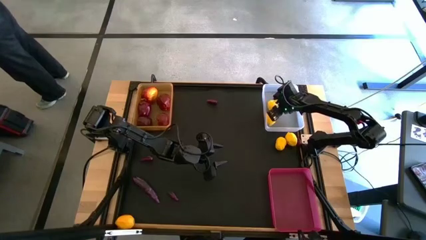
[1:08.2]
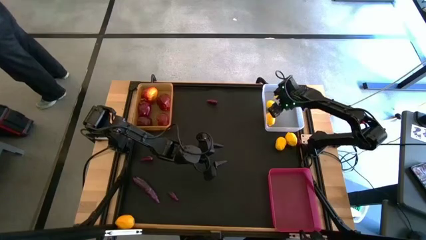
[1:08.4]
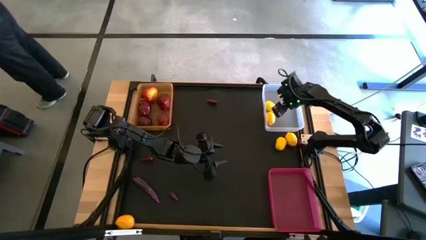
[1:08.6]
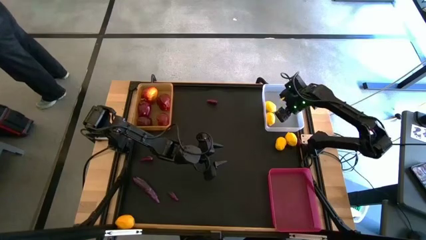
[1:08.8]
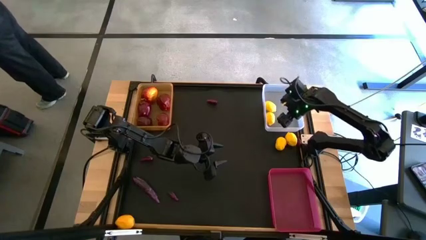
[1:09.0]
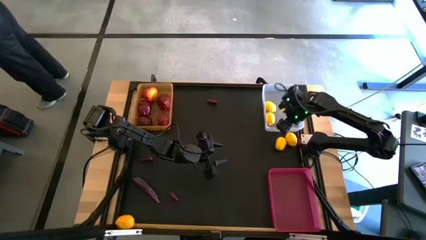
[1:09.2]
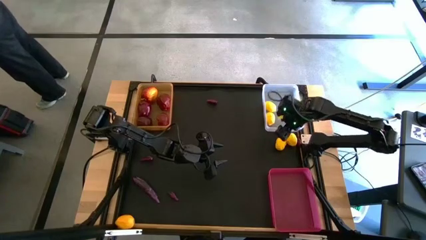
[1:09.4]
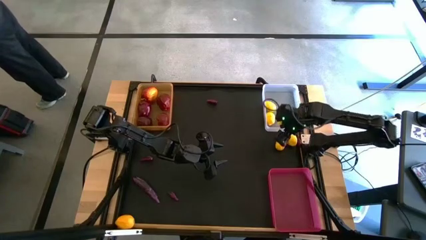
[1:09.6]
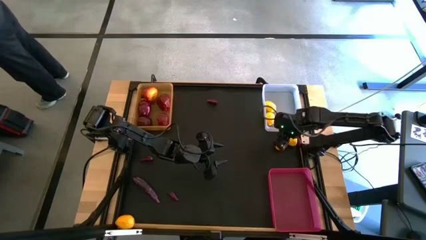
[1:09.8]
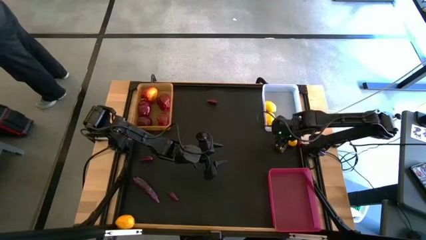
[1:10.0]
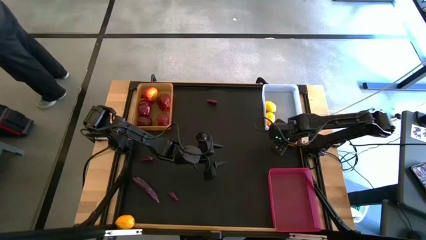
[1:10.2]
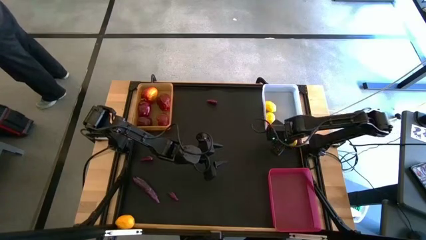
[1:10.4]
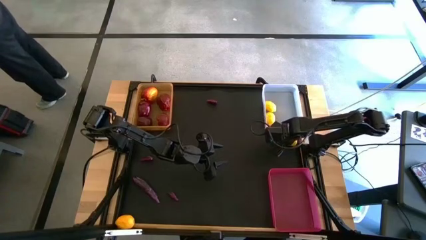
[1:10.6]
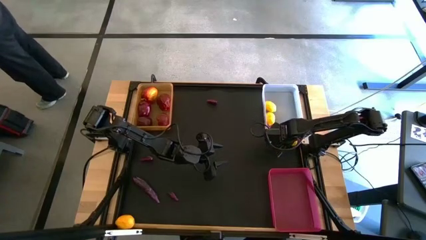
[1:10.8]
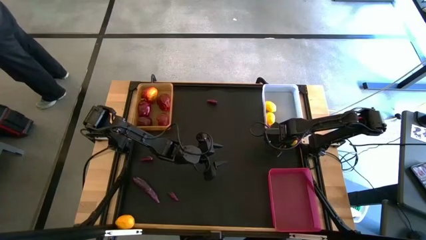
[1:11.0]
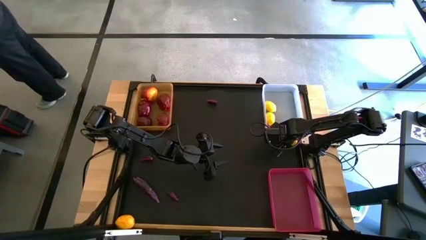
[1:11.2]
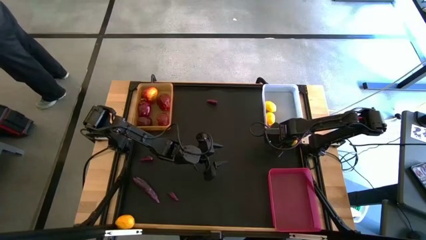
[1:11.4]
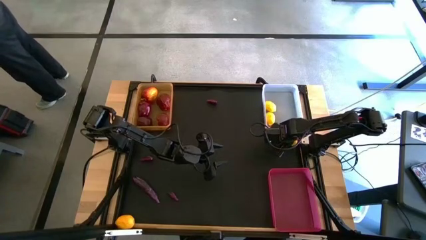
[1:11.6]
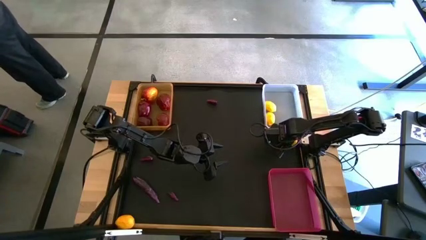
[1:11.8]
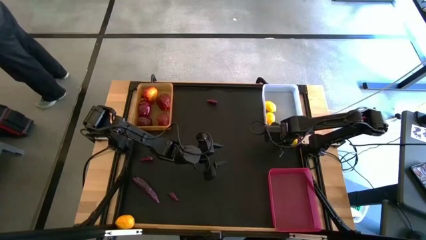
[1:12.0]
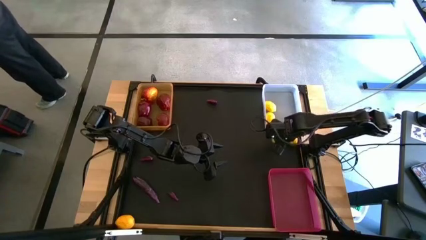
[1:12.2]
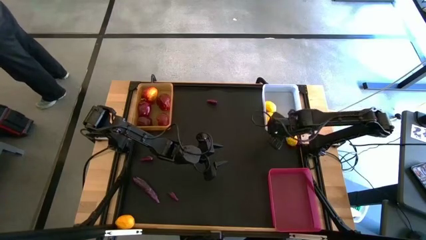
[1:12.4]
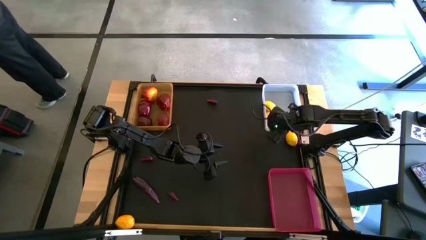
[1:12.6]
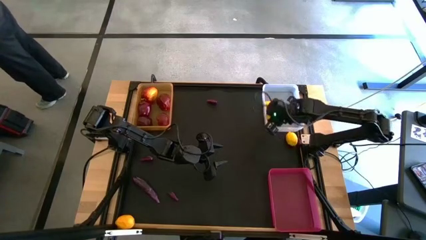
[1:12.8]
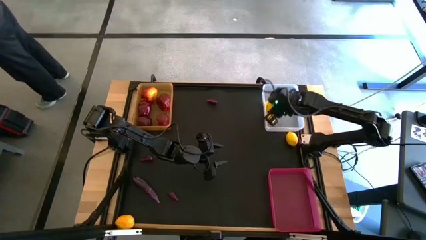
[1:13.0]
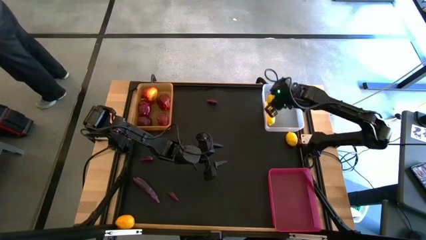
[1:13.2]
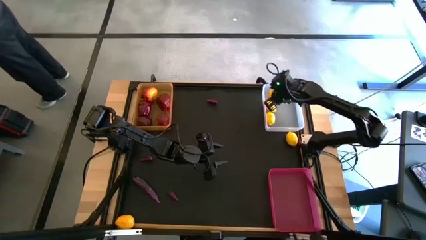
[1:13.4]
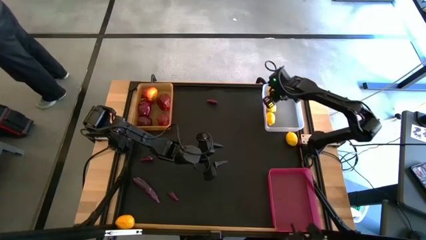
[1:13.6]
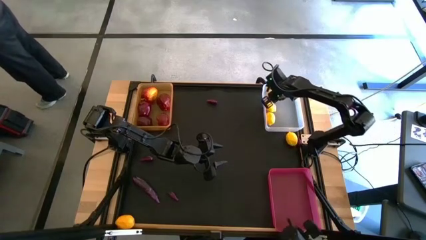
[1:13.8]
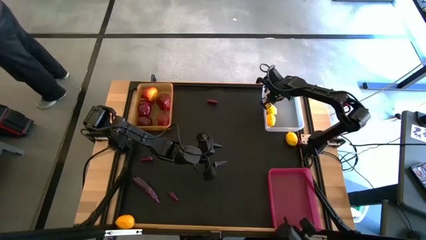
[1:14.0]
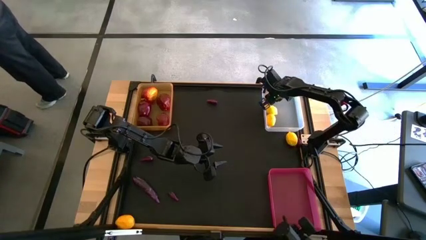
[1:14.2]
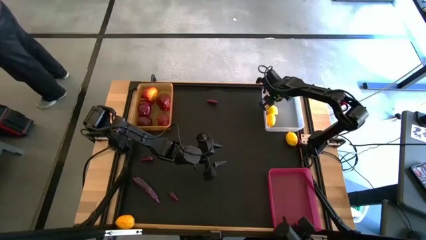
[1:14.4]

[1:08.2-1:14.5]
Task: Sort produce into baskets
Put the lemon into the white bin

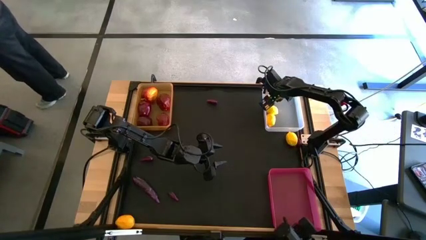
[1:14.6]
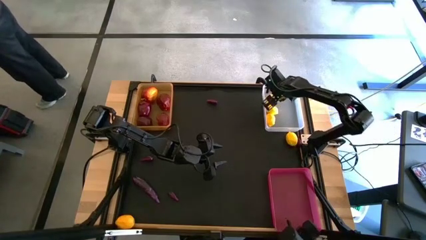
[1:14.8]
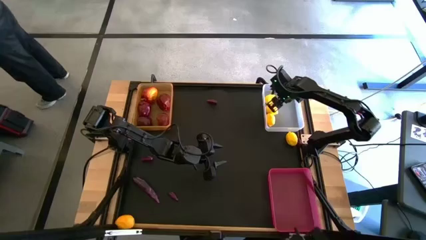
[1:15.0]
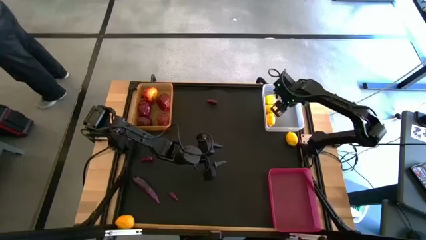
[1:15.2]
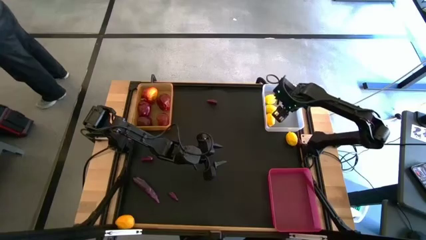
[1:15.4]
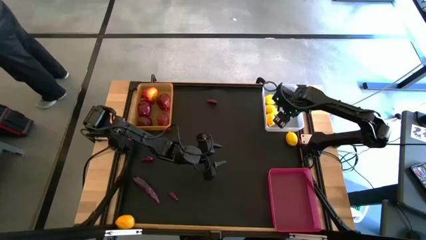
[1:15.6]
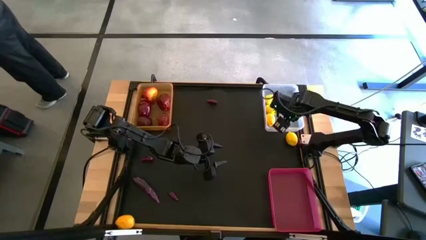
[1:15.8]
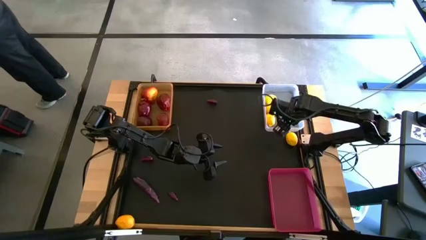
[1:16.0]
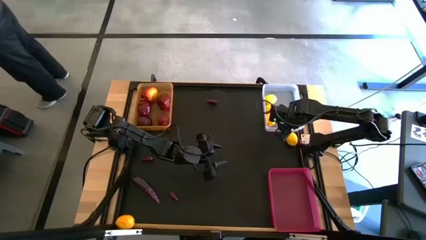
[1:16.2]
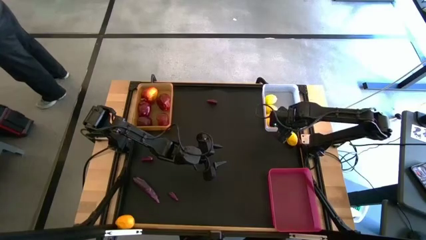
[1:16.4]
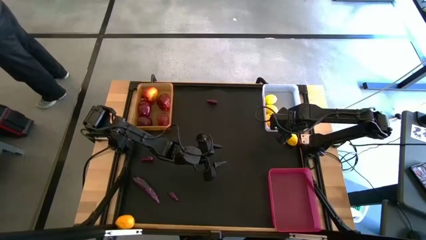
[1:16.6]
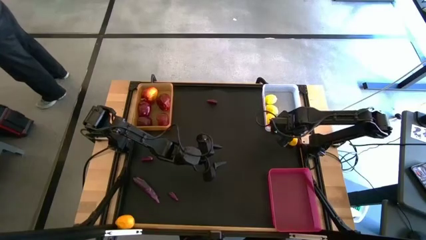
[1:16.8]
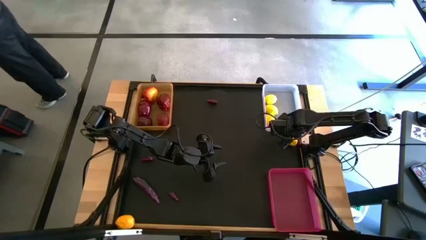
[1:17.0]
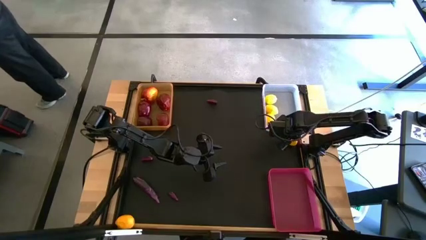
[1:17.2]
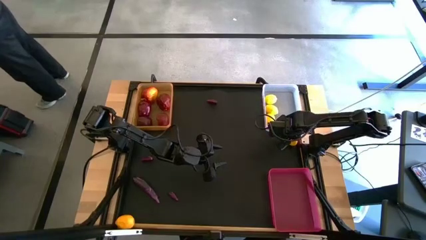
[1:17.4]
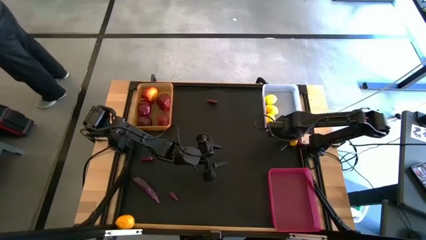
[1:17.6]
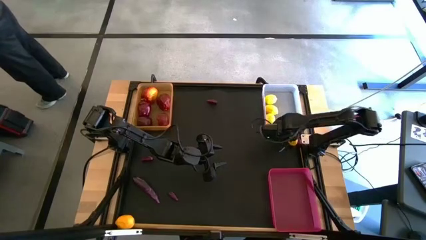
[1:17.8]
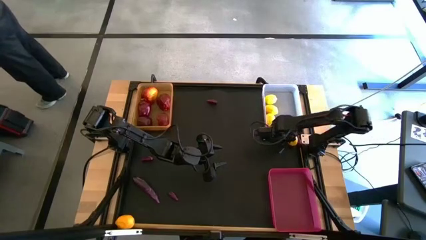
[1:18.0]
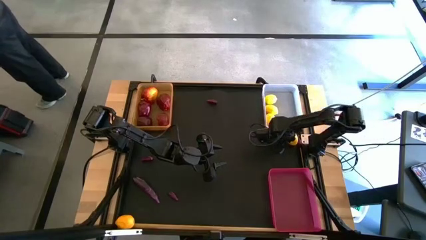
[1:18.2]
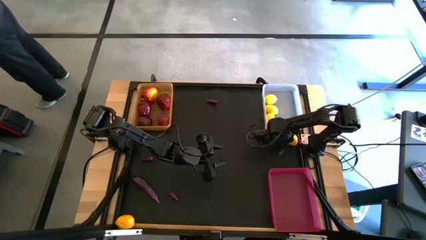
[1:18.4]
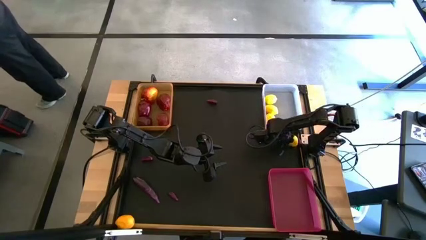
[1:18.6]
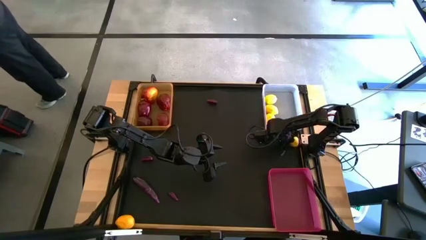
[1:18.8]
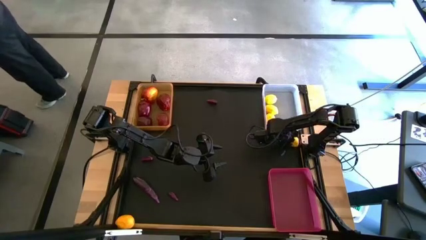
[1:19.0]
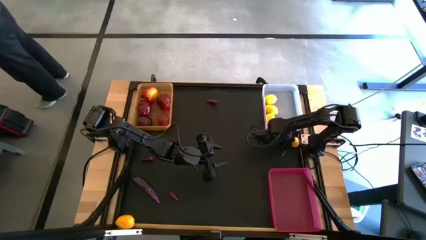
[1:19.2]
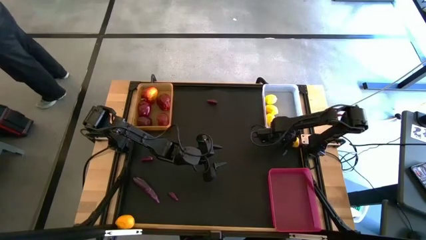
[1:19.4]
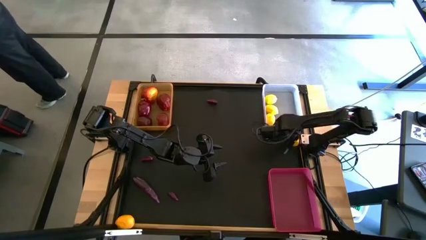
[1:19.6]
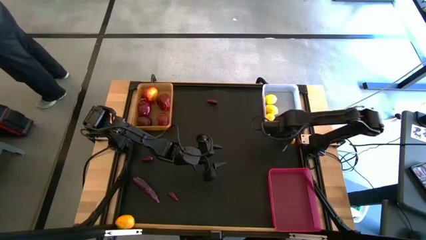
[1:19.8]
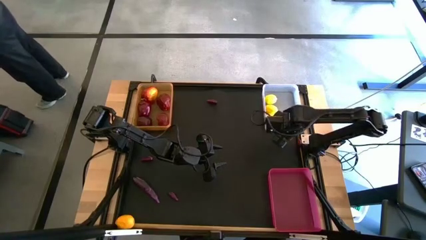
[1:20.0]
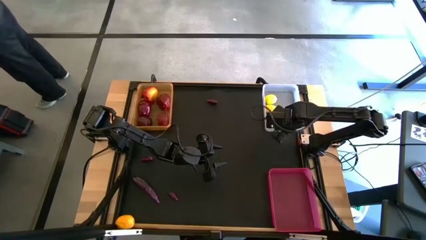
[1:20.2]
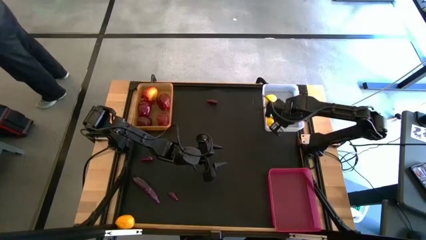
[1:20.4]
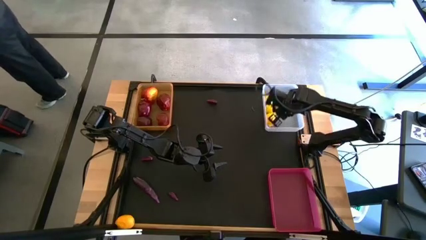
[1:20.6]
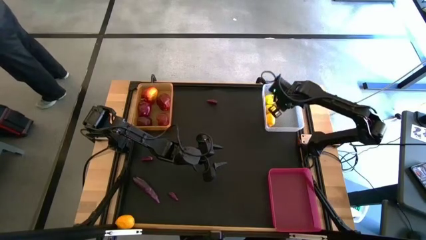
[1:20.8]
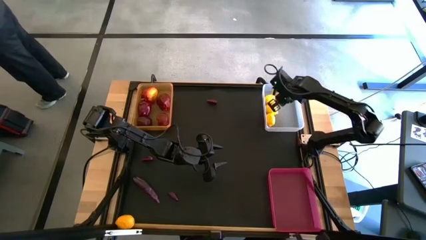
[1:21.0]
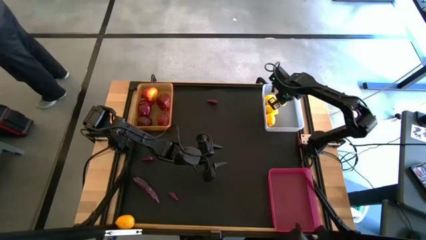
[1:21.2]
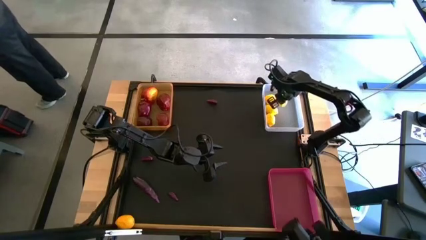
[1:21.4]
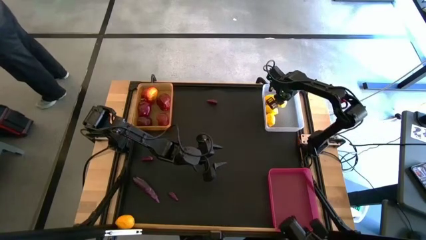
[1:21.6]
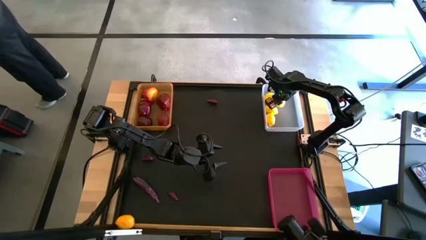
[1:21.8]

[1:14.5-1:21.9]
Put the lemon into the white bin

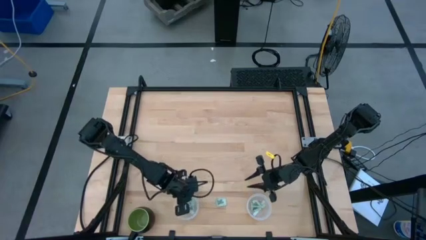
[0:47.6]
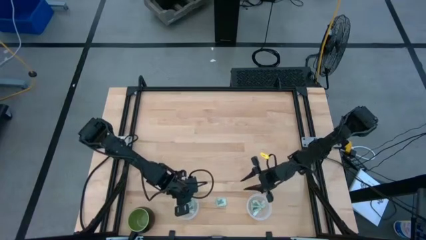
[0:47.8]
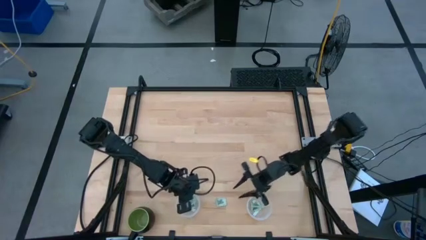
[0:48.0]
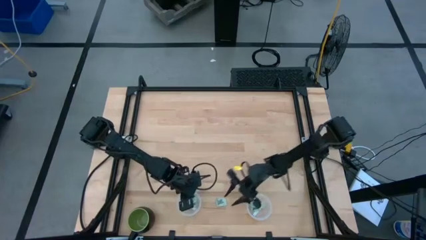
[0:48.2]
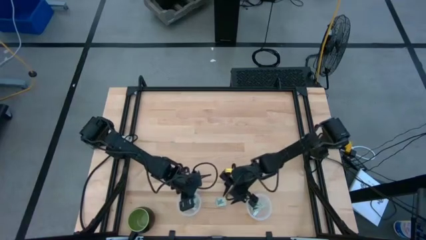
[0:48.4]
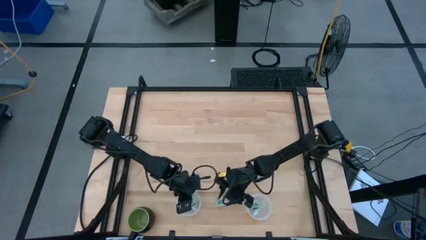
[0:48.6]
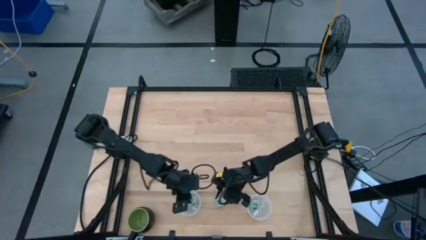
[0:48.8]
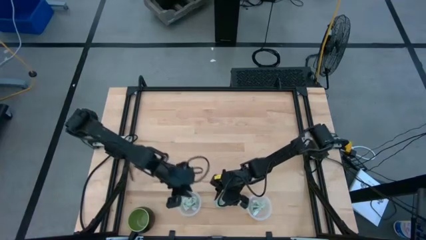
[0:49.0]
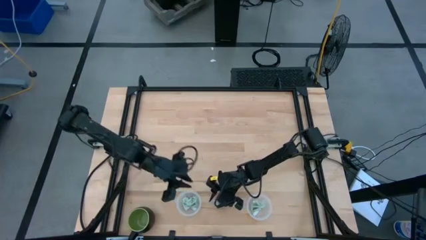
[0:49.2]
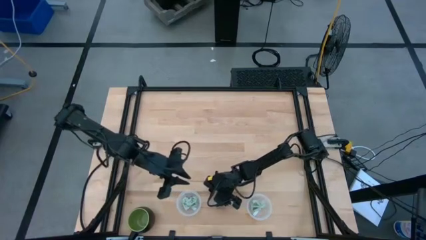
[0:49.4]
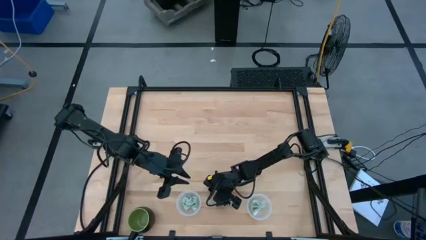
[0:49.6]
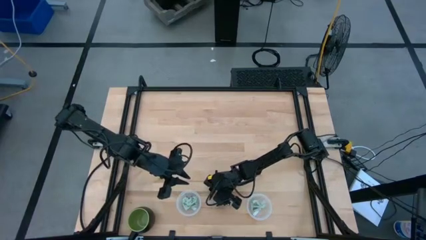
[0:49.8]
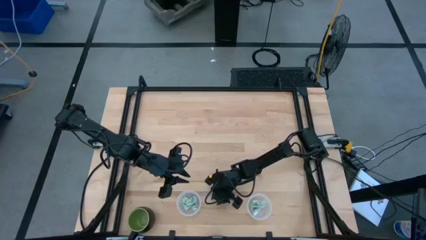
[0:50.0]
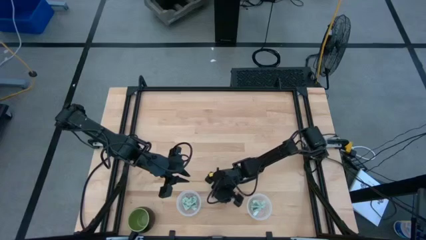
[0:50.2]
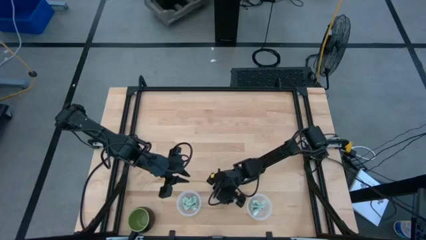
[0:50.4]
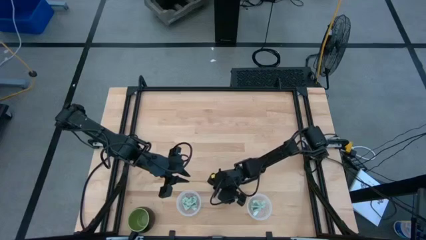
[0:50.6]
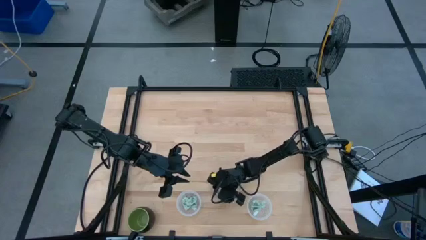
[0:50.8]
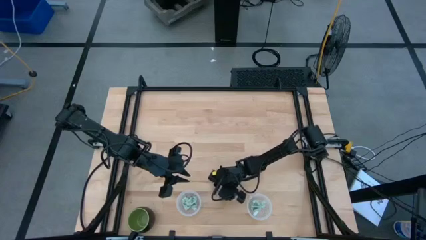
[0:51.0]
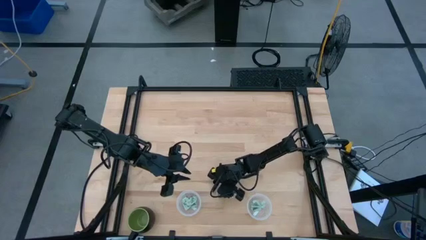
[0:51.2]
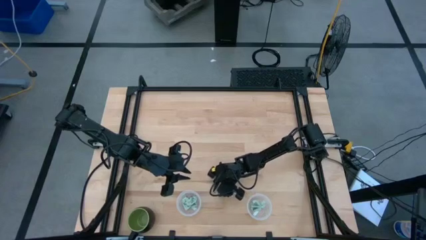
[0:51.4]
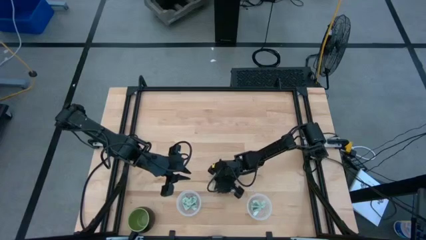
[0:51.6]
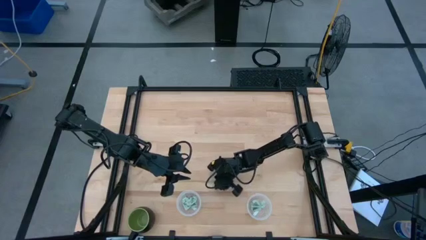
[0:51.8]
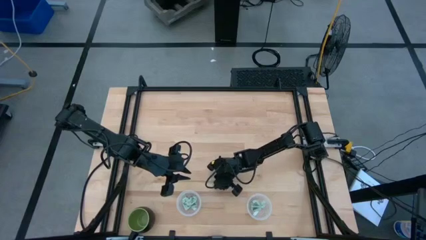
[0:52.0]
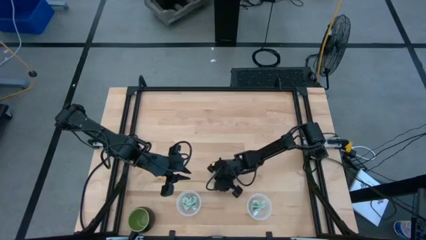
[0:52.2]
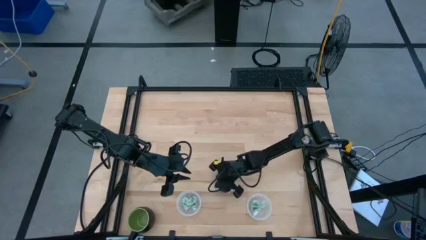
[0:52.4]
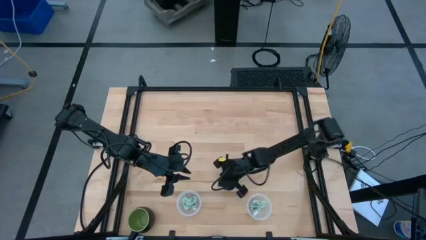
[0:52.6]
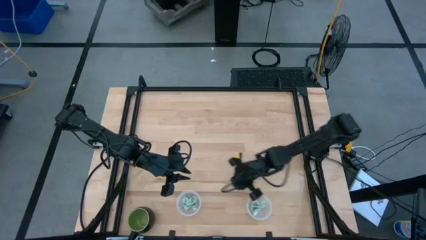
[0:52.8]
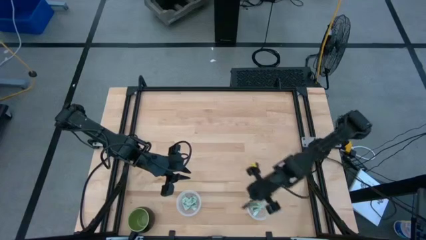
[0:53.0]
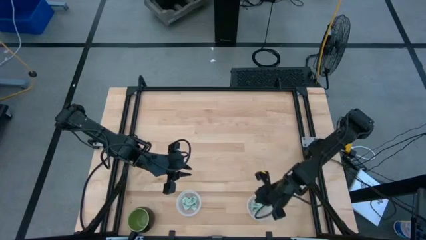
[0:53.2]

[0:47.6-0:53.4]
Task: Pick and place Stevia / Truvia into bins
Put the stevia packet into the right transparent container
